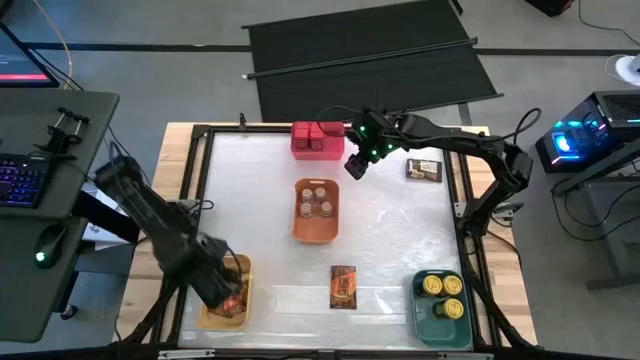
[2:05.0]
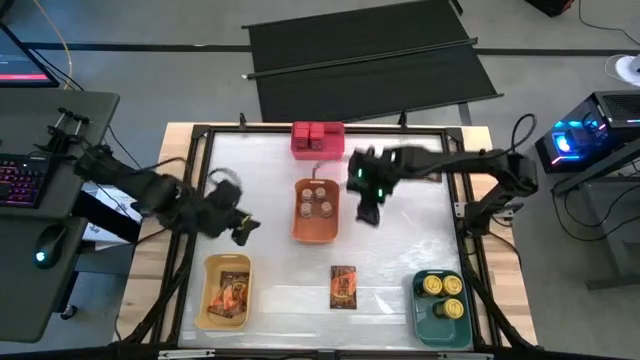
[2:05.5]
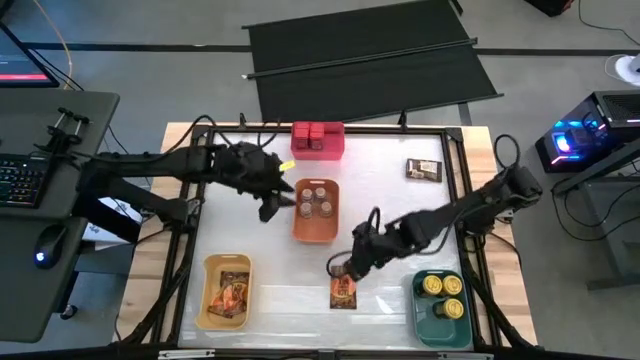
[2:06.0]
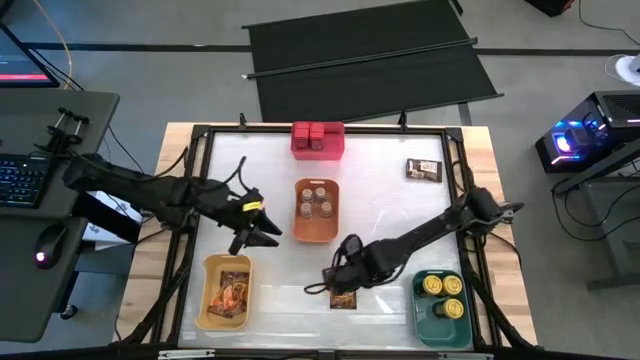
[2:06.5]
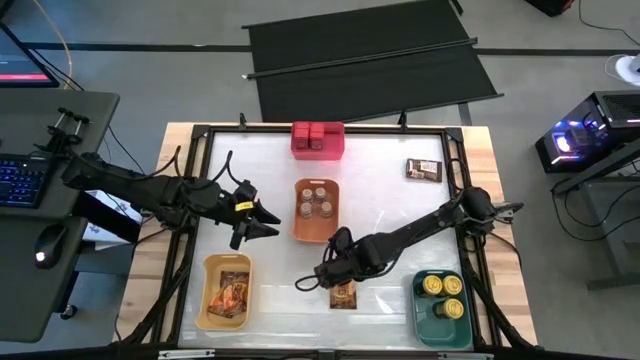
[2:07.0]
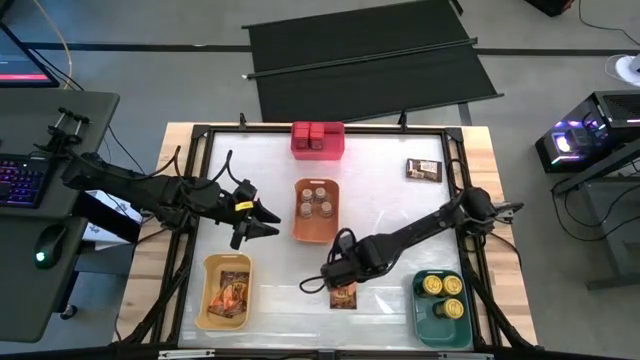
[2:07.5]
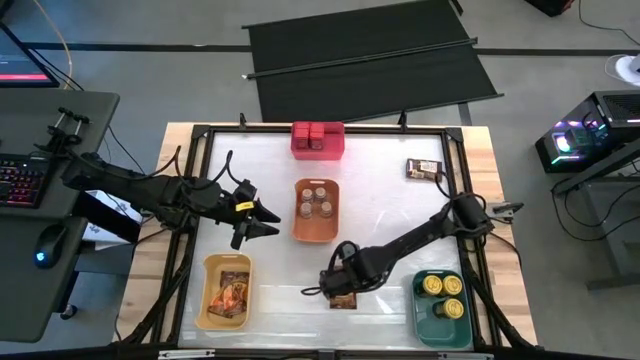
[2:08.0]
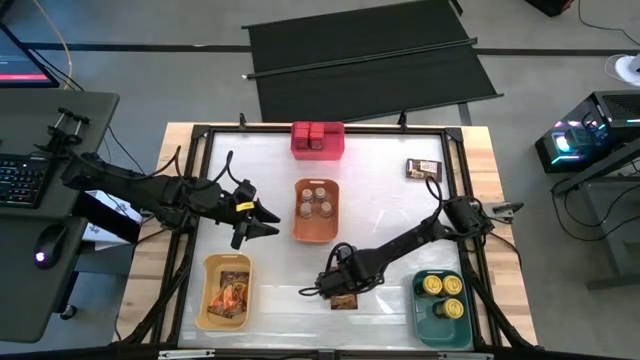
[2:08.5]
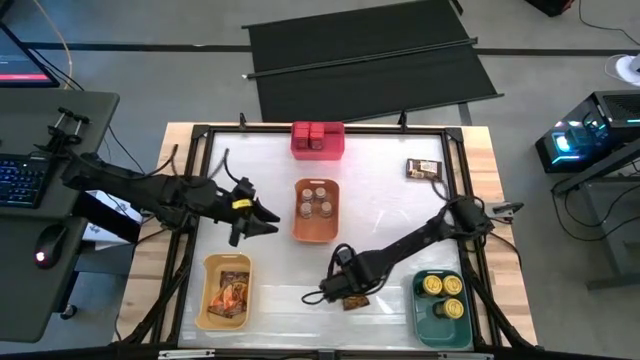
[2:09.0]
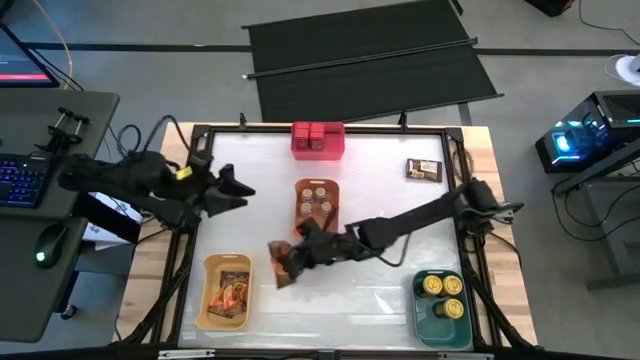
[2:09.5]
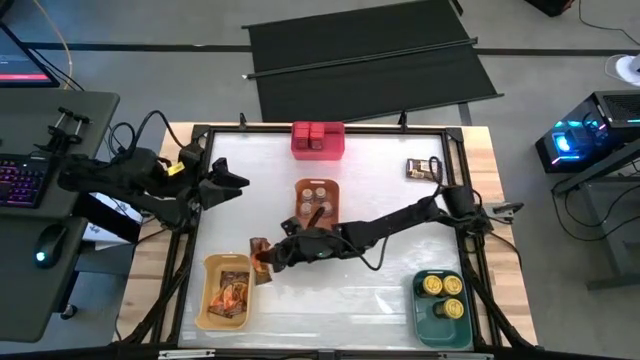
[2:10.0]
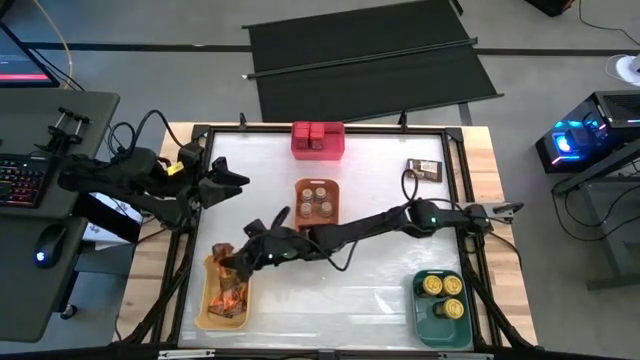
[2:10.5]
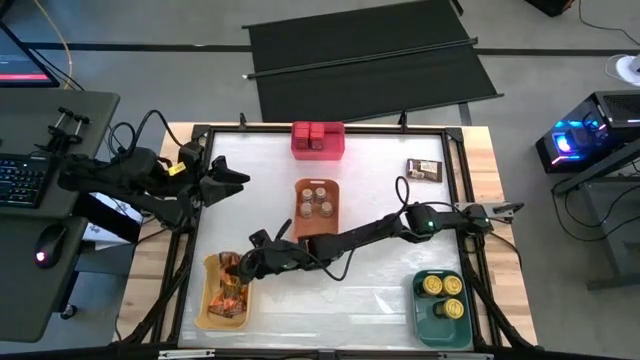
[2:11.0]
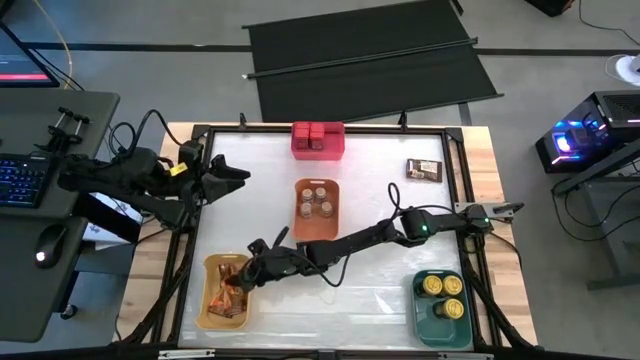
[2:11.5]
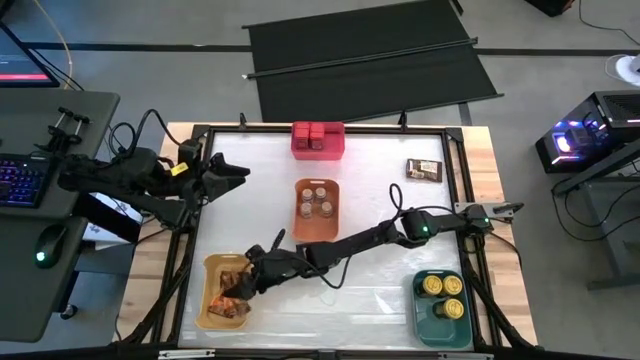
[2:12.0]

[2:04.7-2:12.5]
Task: Sort spices by type
Put the bottom orange spice pack into the yellow bin

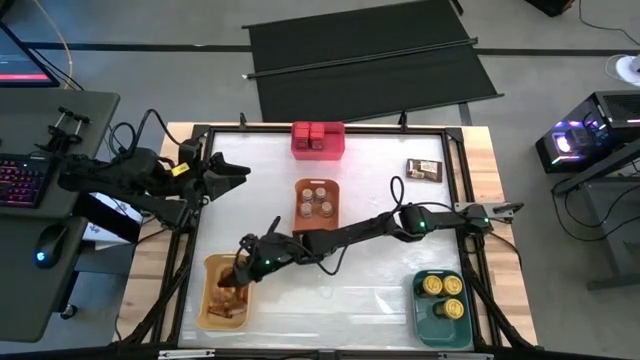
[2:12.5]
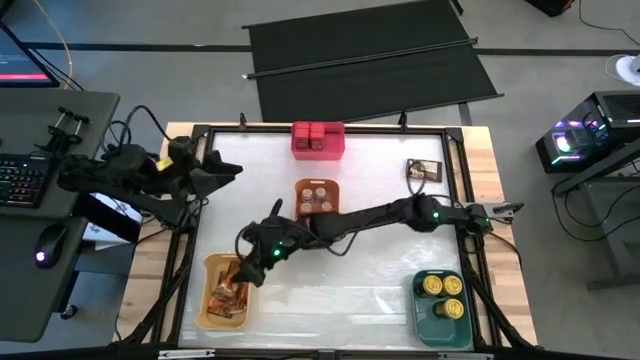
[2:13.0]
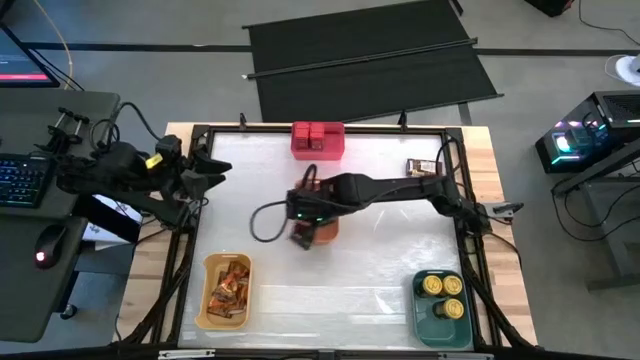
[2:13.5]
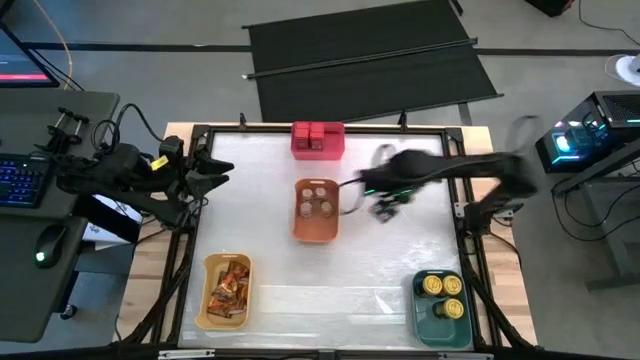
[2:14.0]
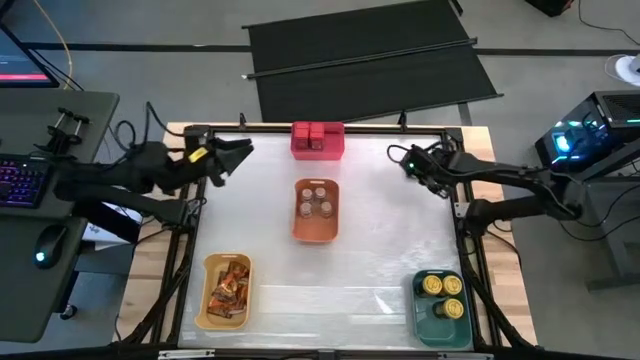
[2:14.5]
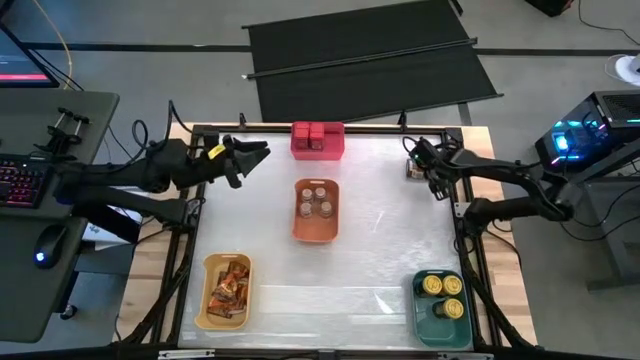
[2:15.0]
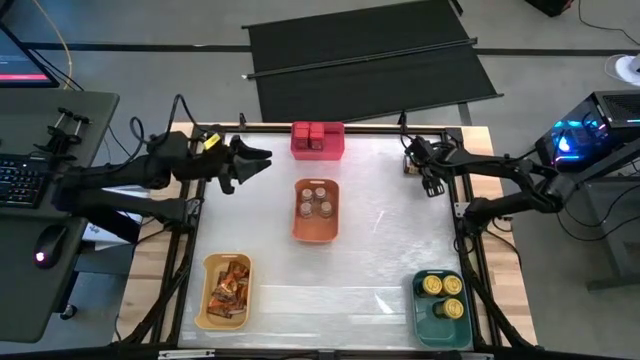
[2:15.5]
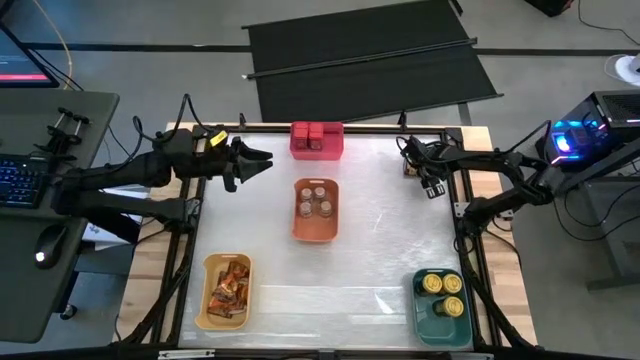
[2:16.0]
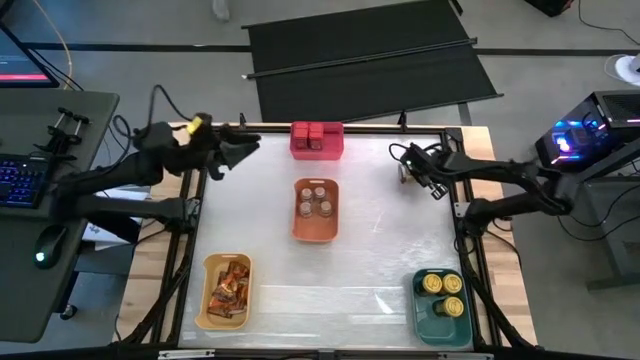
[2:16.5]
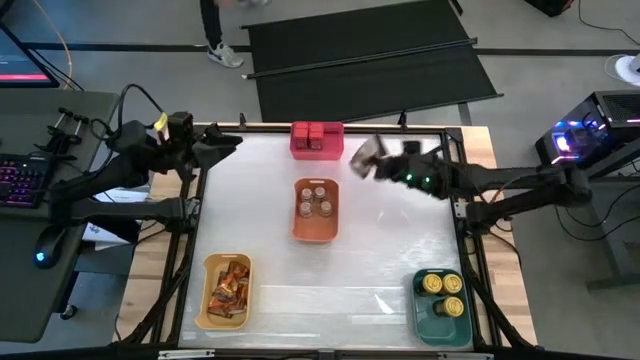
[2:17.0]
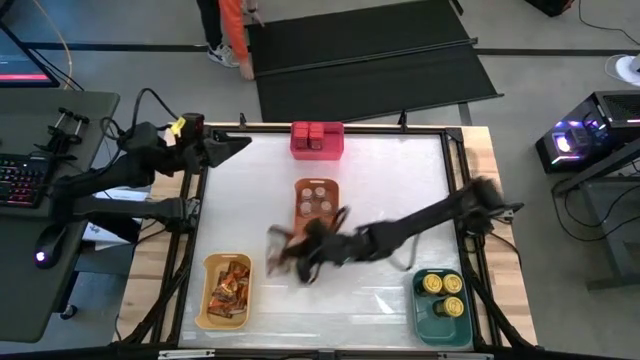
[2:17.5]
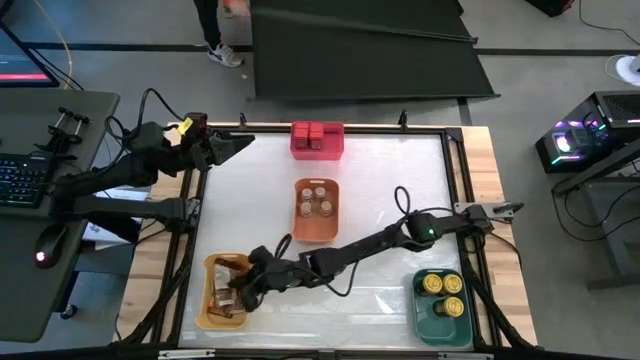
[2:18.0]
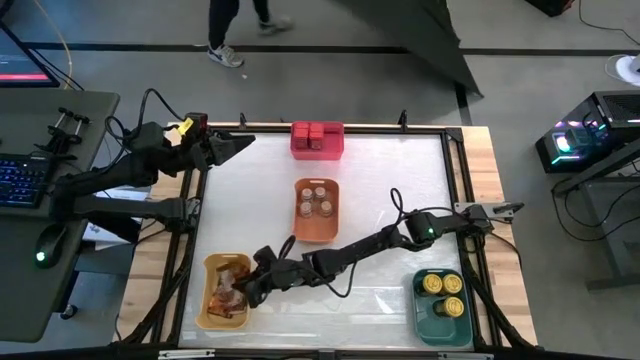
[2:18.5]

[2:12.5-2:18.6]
Put the orange spice pack into the yellow bin

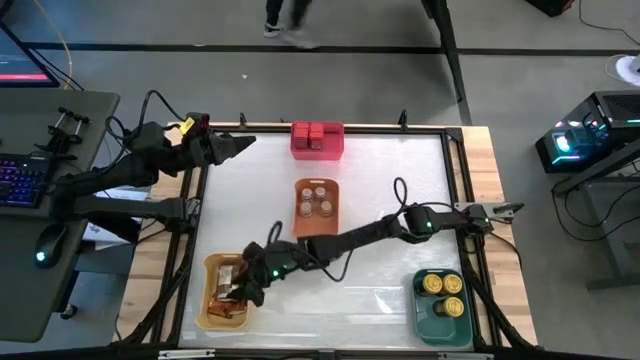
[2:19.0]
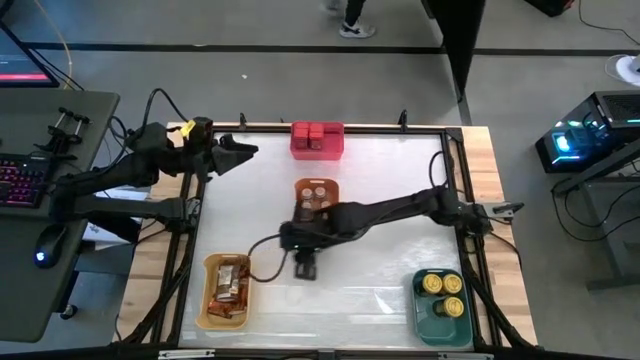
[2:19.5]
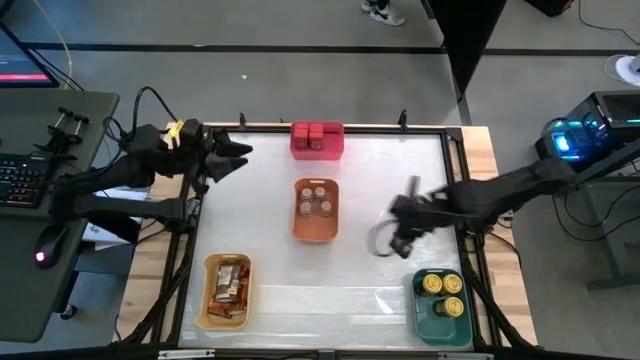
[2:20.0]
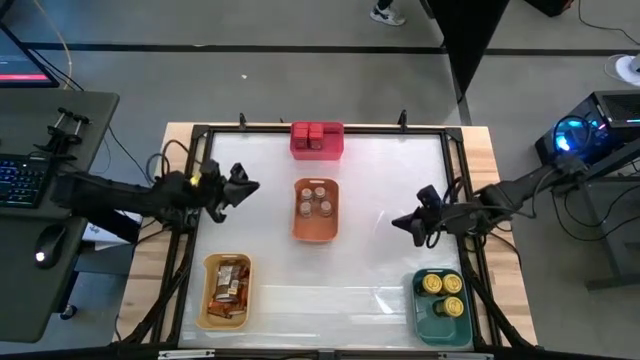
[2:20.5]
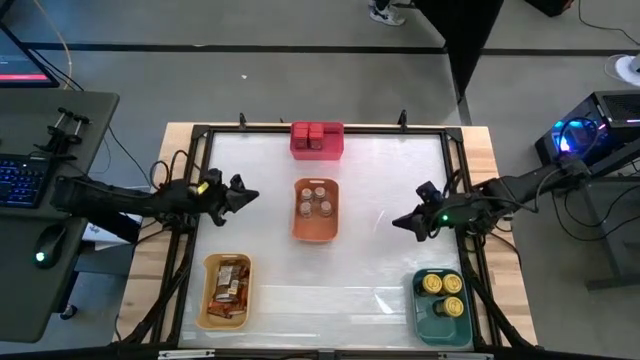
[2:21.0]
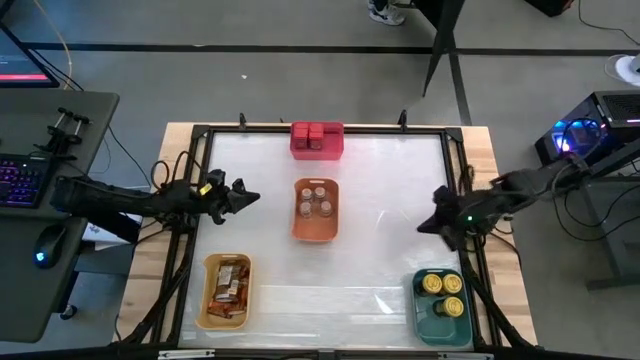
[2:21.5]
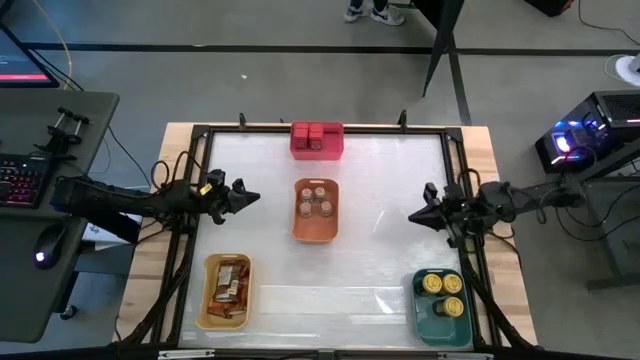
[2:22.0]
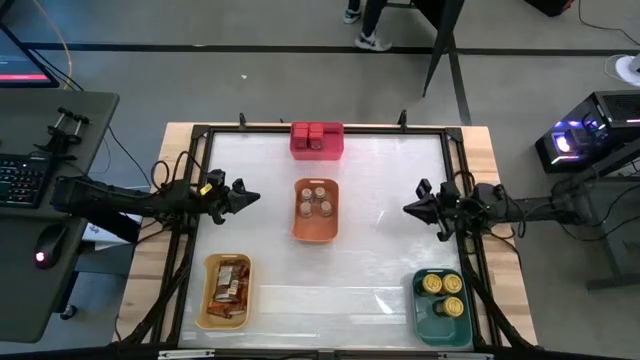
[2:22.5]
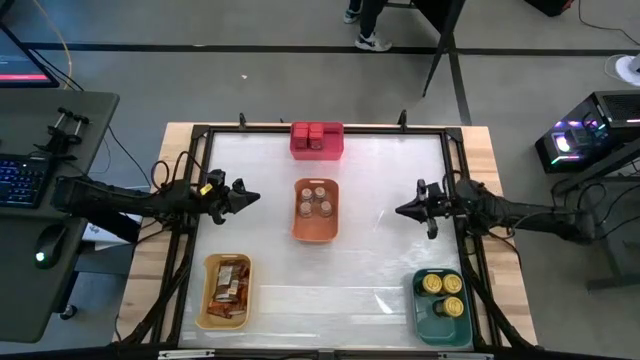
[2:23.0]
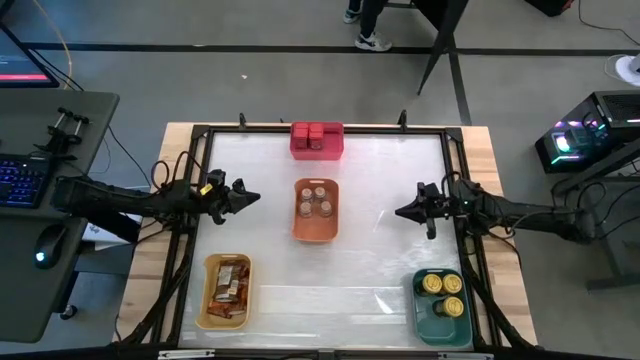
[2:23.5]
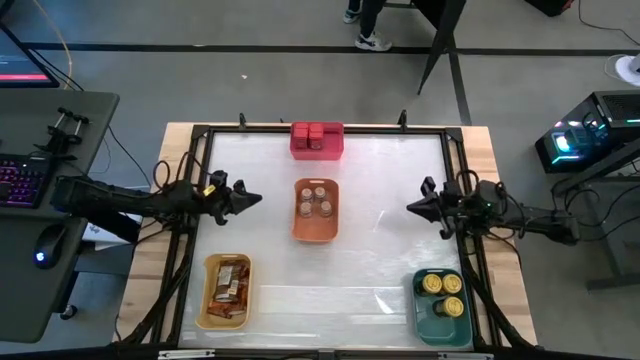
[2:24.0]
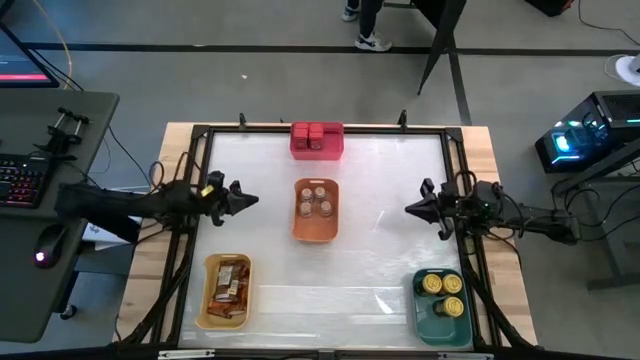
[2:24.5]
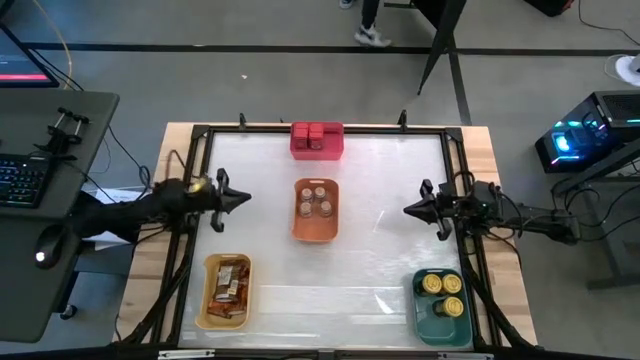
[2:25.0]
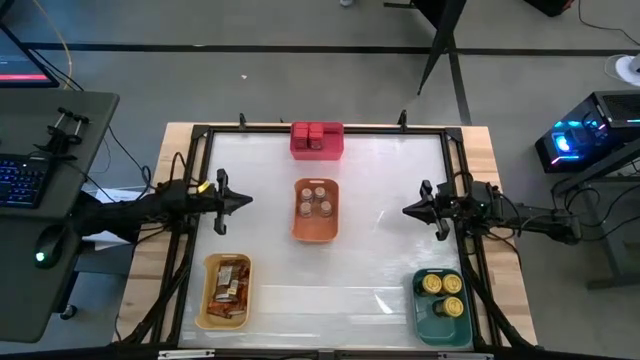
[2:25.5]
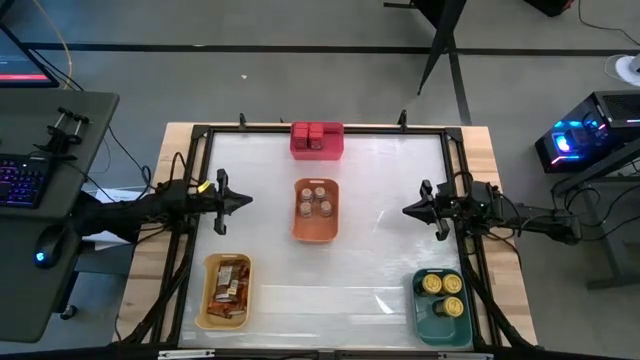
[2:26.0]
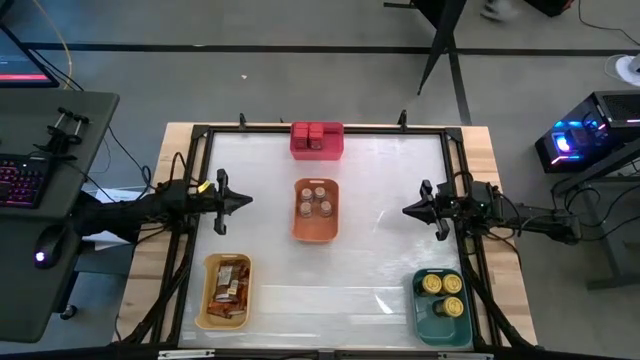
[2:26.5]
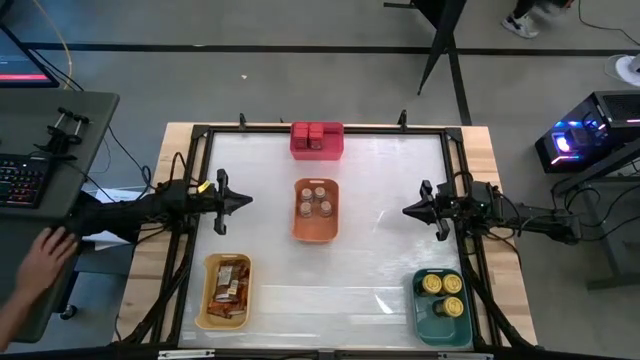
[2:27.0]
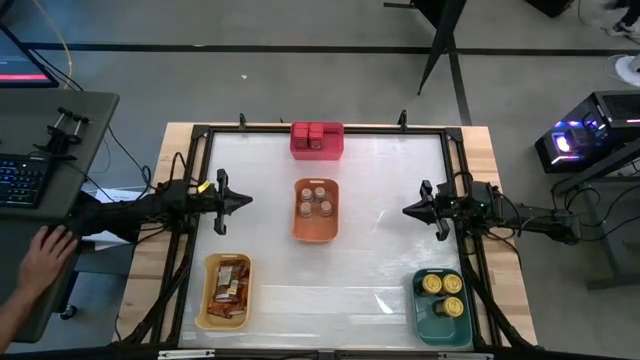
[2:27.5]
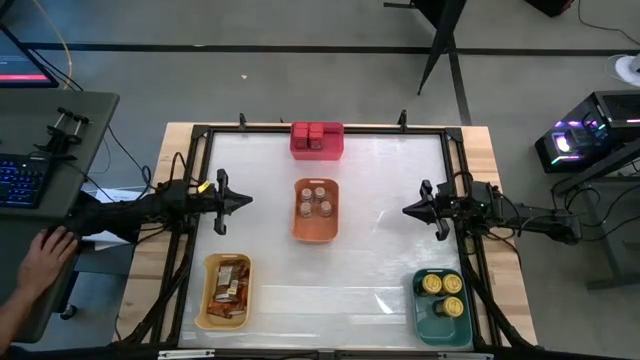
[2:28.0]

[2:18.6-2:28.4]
Return to Home Position
